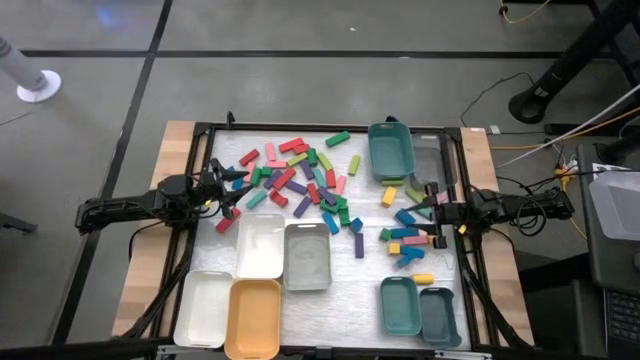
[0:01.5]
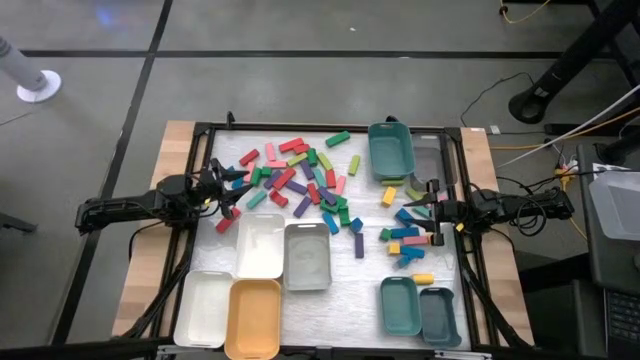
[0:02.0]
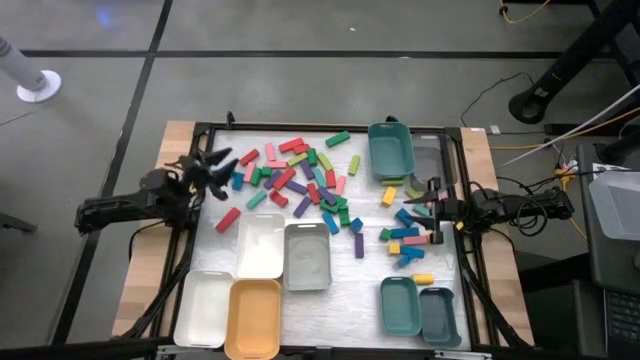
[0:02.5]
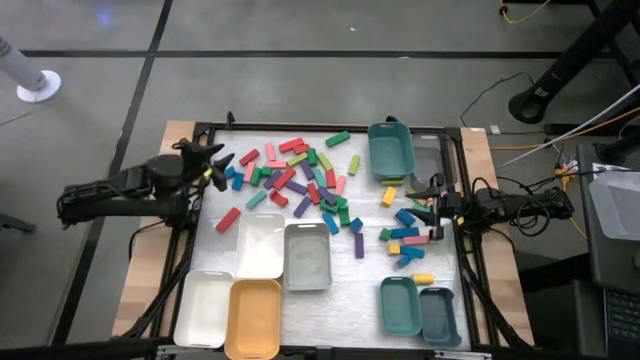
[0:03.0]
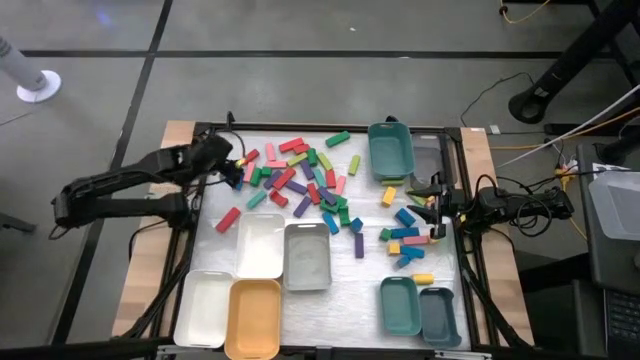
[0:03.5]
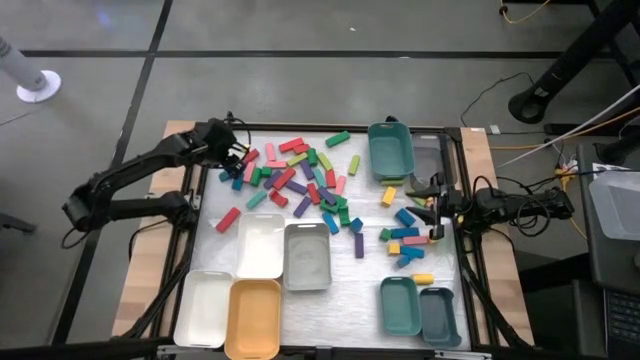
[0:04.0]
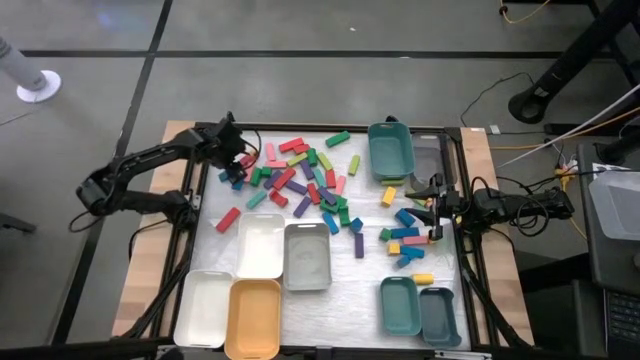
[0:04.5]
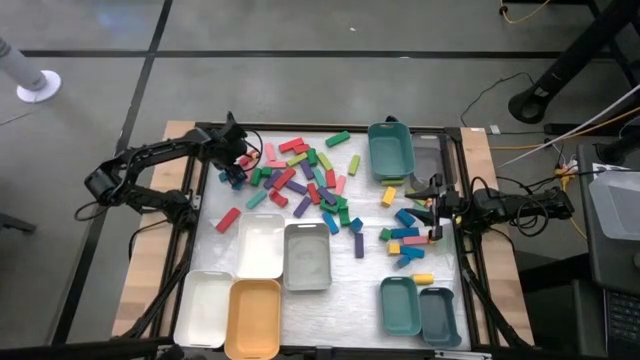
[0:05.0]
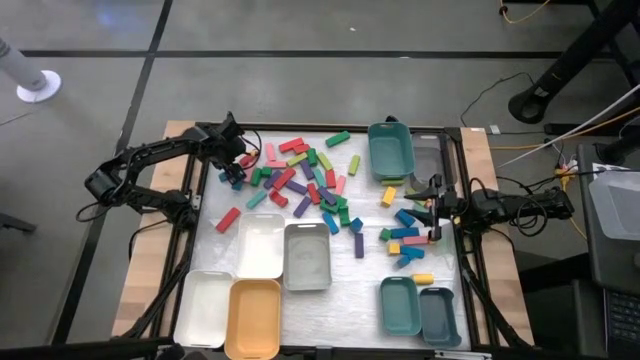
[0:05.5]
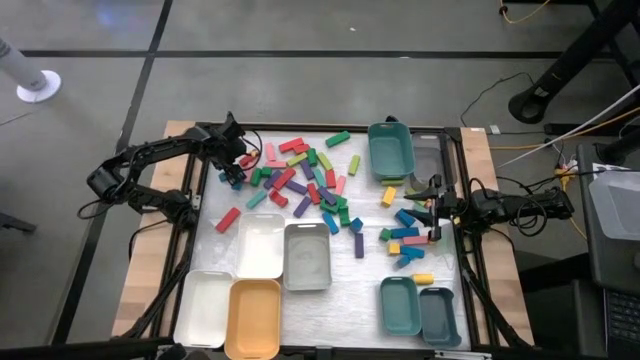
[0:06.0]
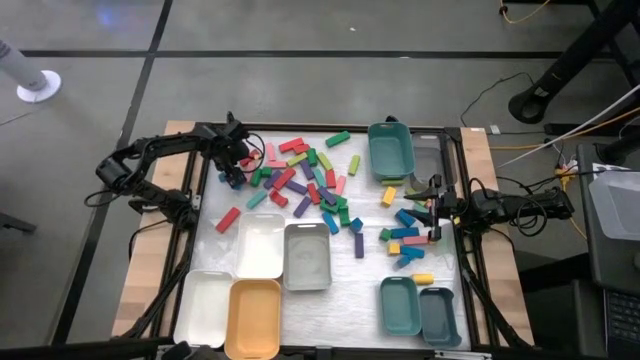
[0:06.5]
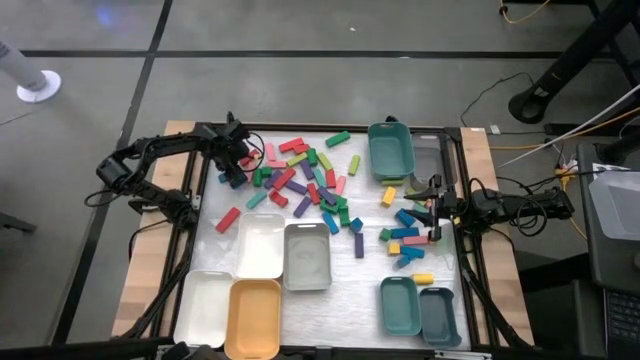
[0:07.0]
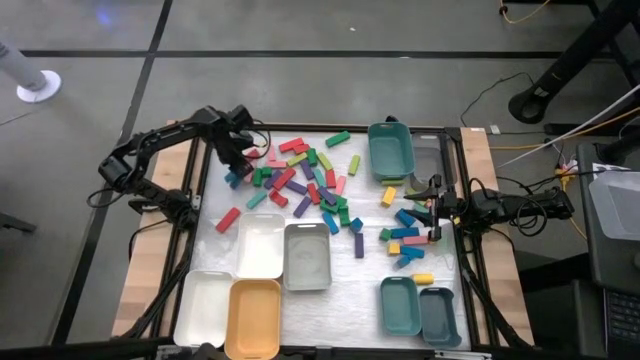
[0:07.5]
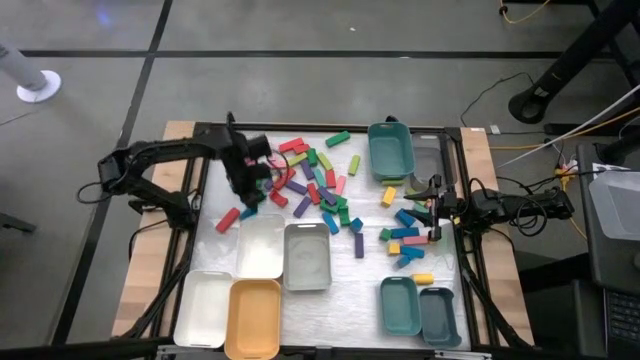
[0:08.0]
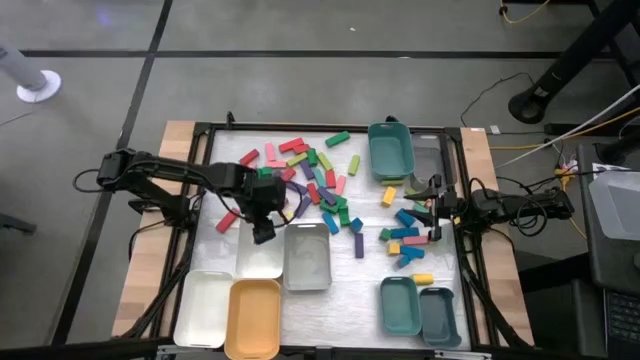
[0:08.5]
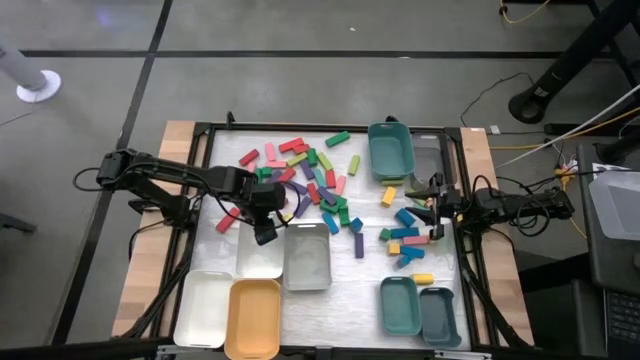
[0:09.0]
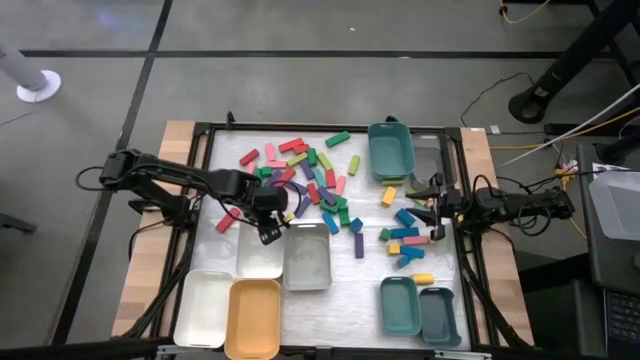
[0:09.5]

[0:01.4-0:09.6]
Task: Sort blocks
Put the blue block into the top white bin

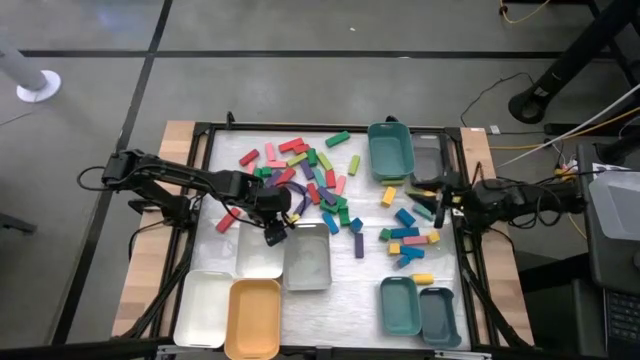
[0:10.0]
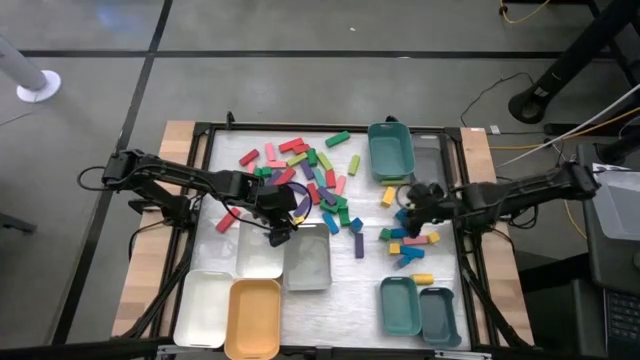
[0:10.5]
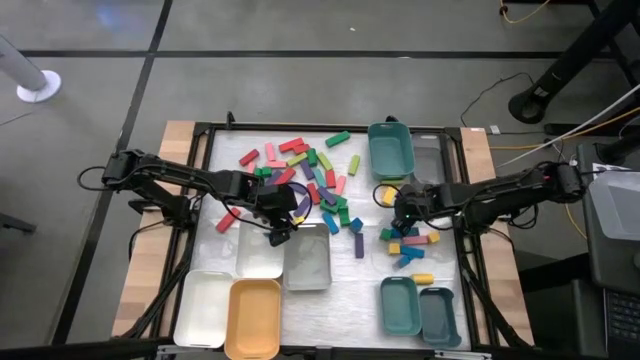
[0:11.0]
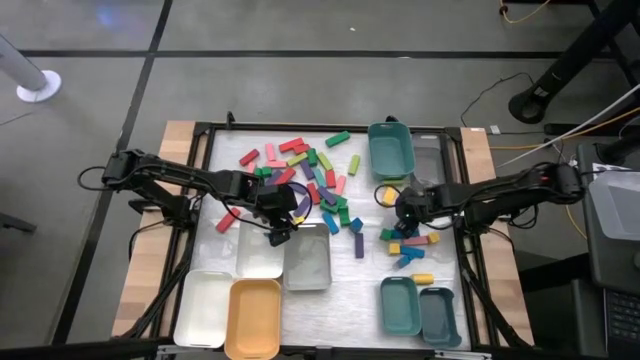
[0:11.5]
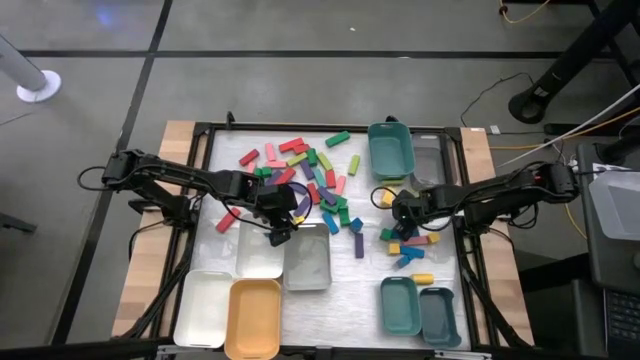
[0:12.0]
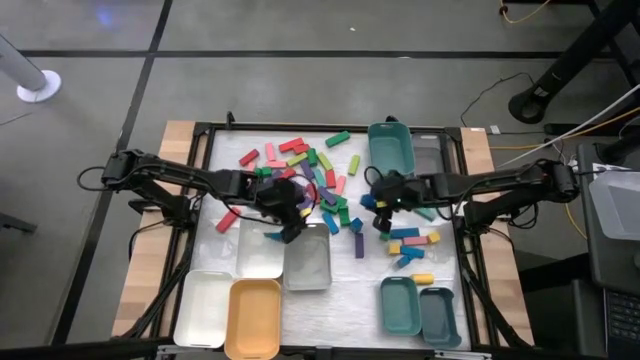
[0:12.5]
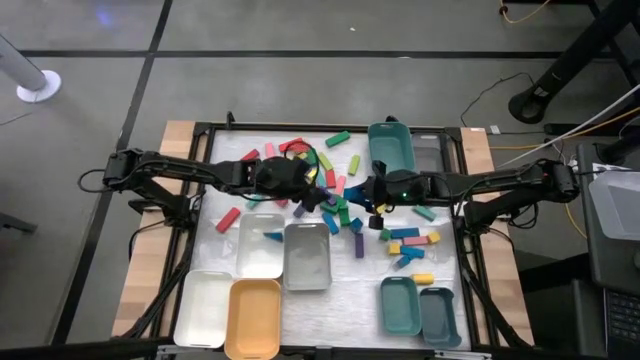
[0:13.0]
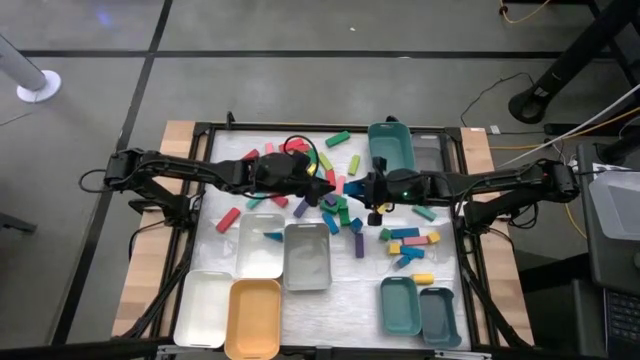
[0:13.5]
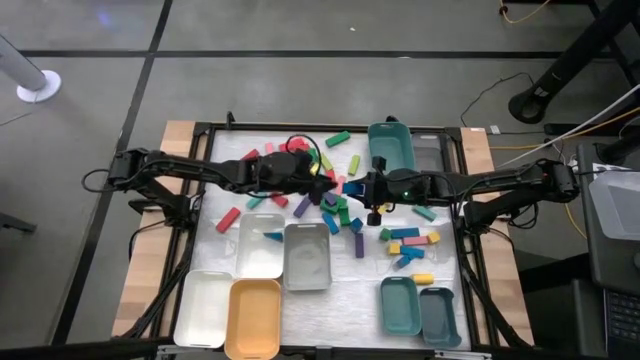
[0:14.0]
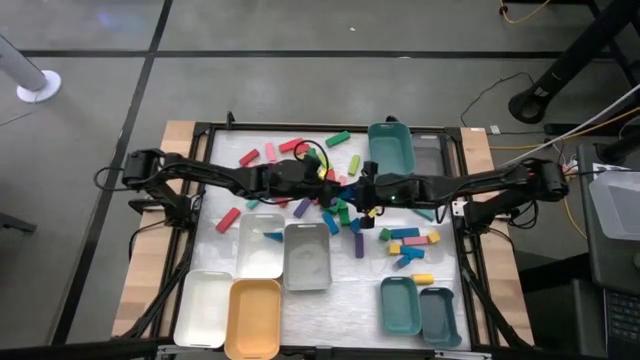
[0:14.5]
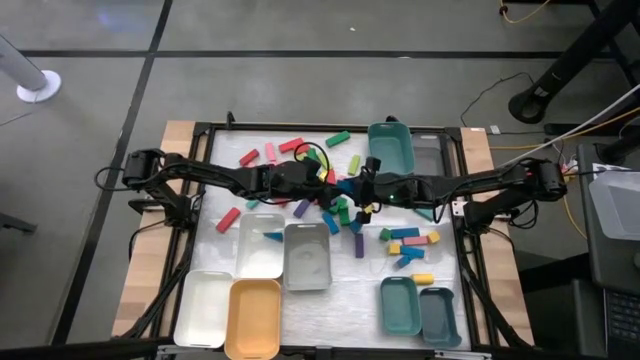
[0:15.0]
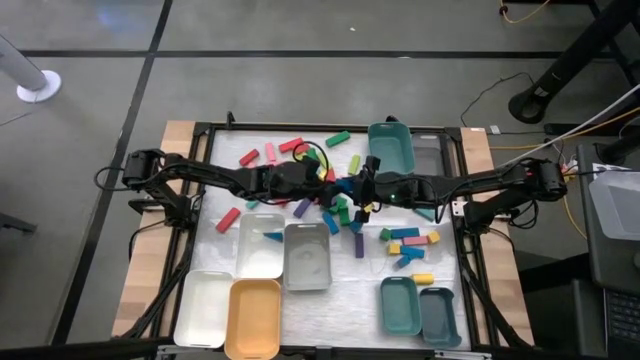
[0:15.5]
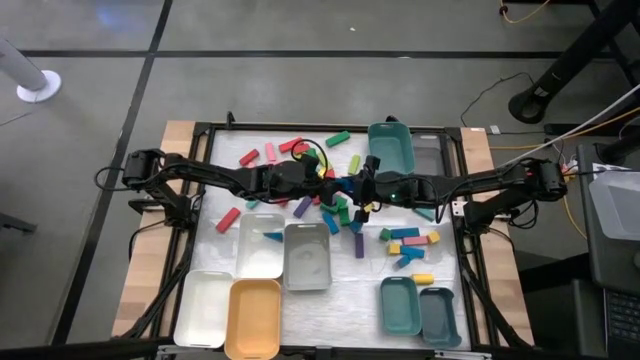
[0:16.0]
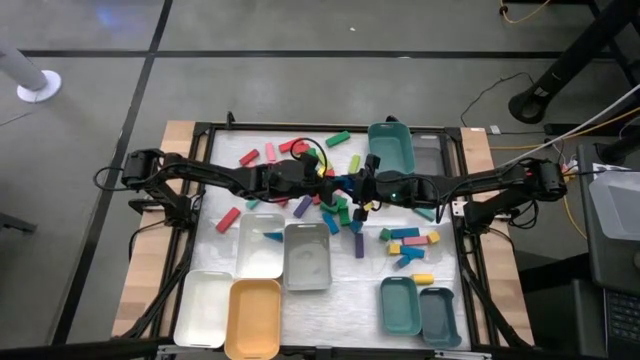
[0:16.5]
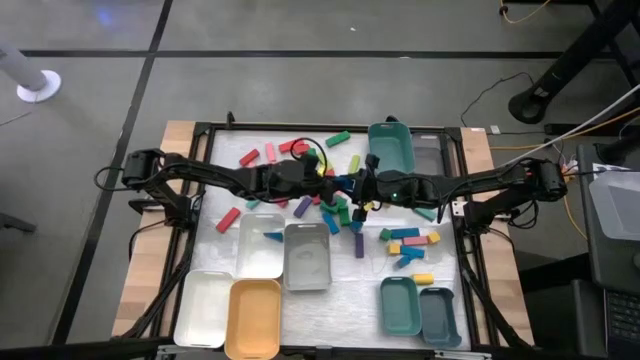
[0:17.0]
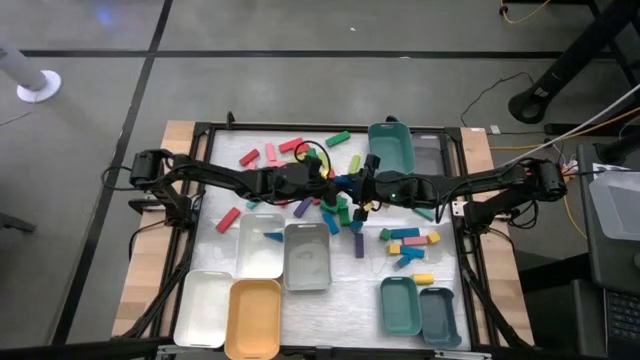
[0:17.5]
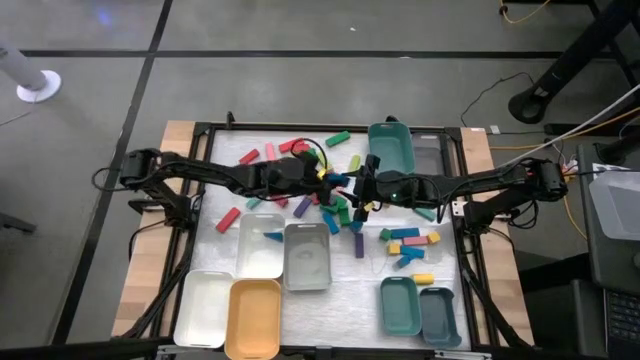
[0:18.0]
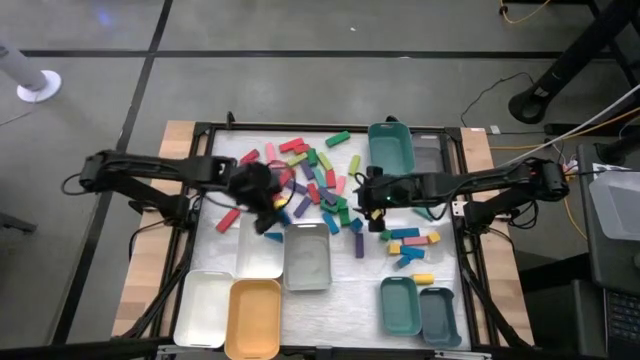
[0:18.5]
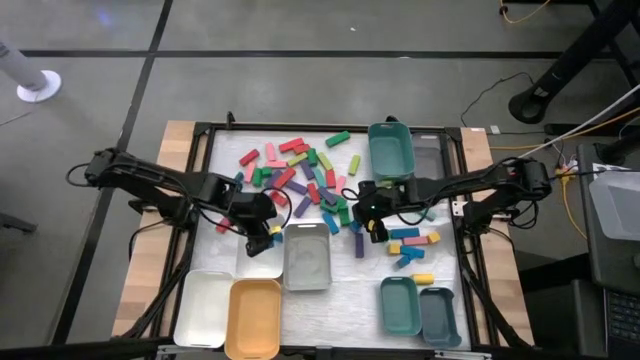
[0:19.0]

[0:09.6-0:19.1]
Put the blue block into the top white bin

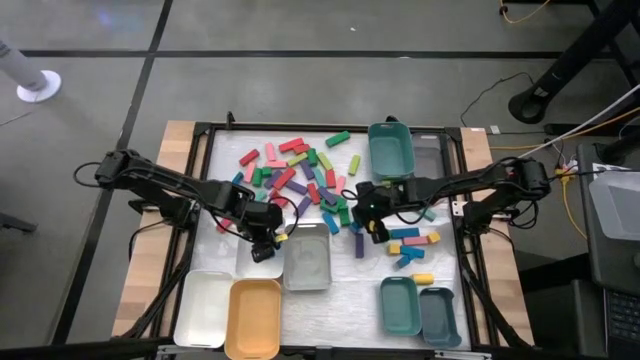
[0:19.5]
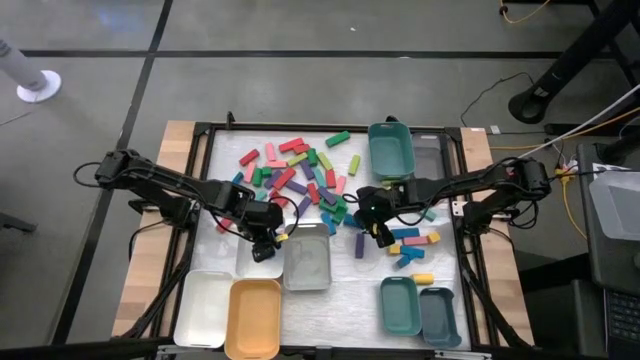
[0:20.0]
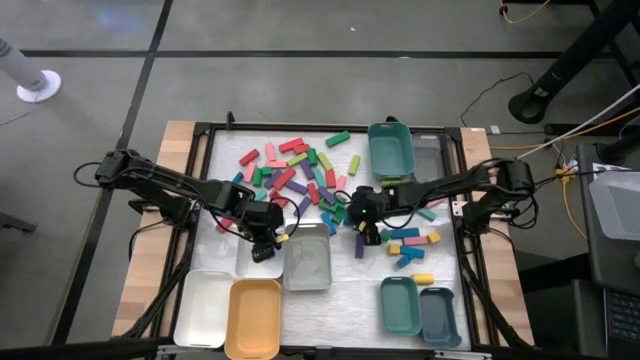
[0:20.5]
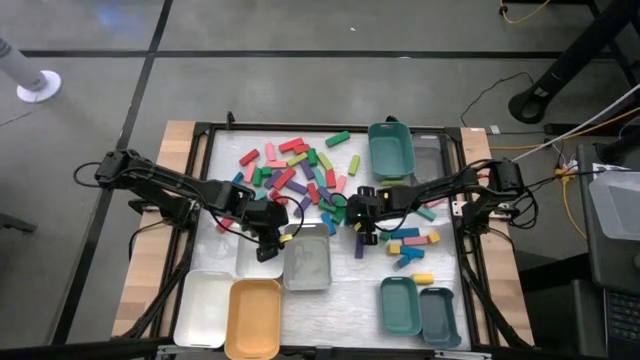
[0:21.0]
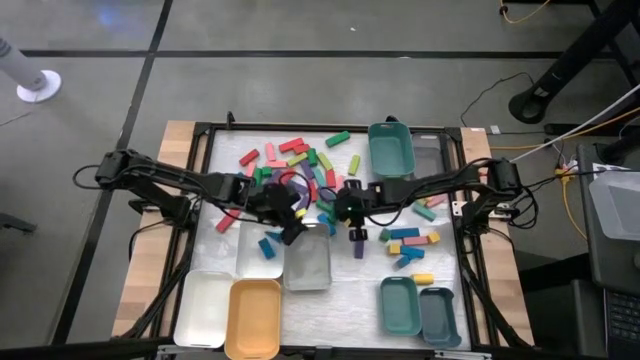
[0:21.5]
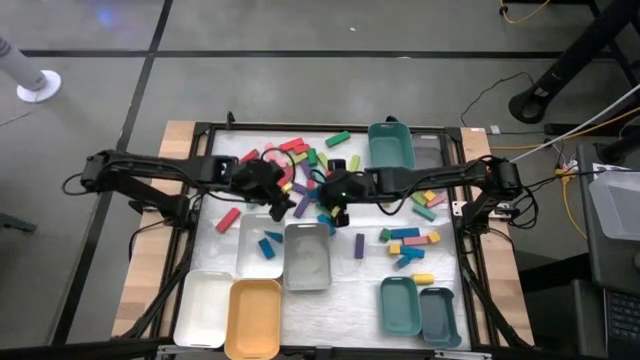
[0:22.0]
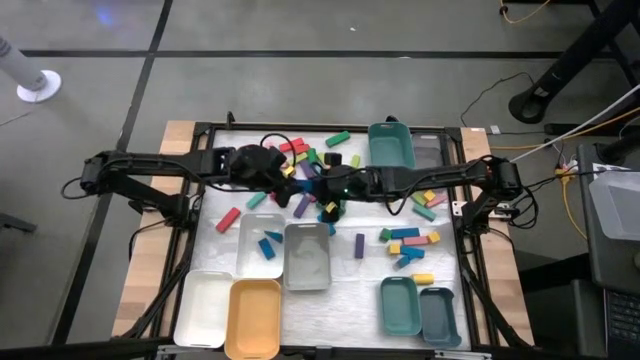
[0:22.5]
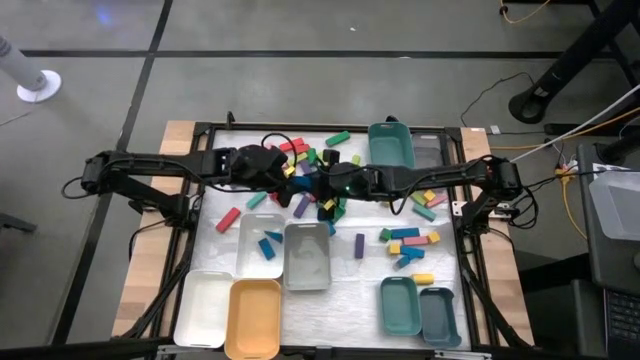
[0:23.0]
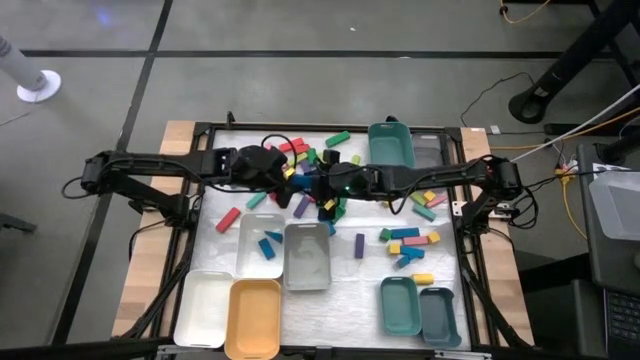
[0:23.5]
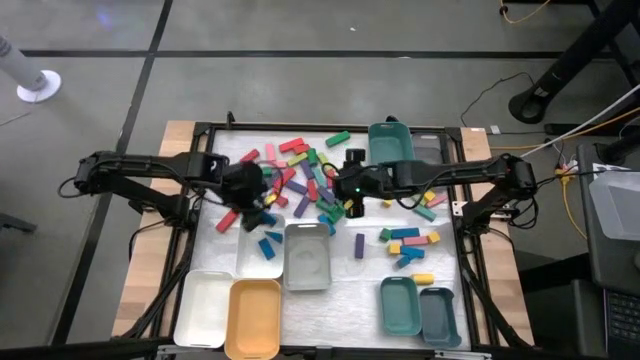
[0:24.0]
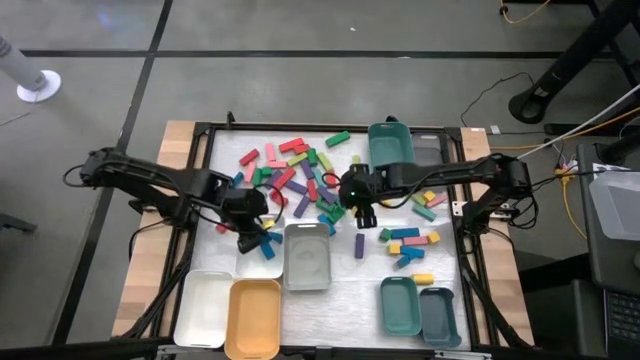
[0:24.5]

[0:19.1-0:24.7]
Put the blue block into the top white bin
